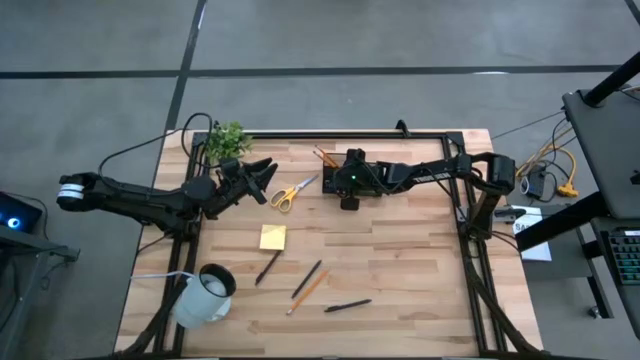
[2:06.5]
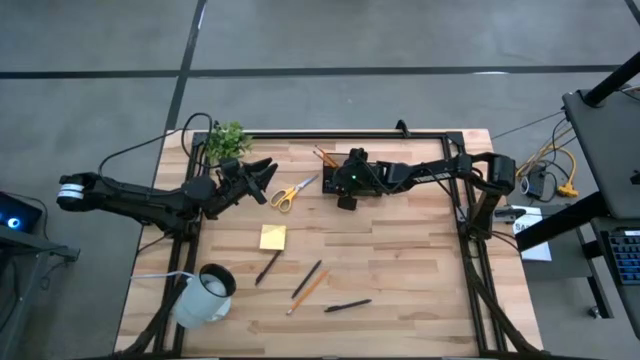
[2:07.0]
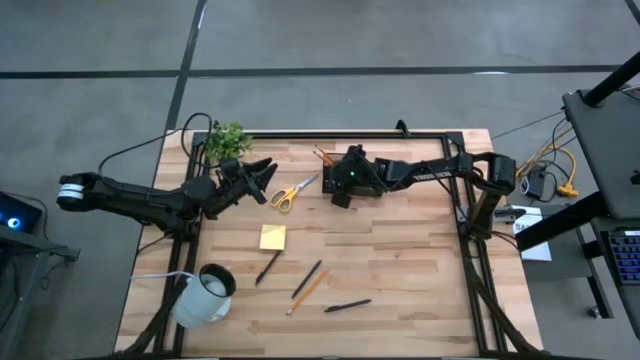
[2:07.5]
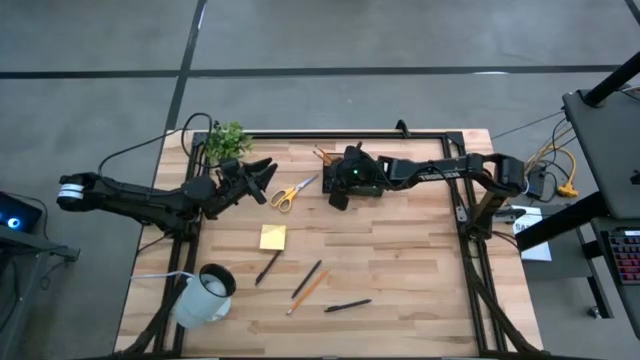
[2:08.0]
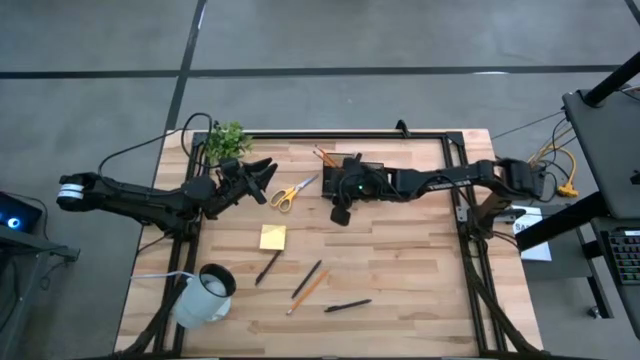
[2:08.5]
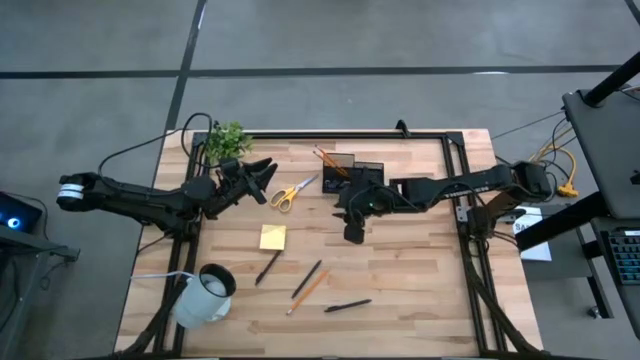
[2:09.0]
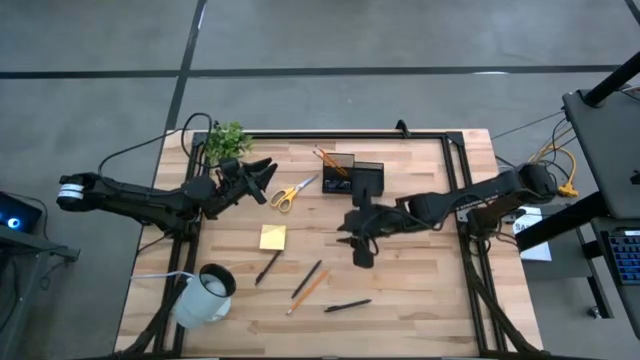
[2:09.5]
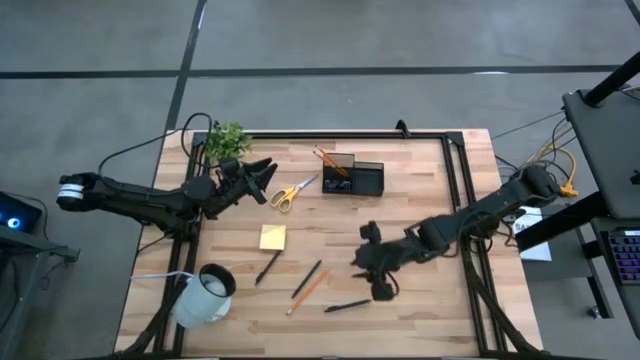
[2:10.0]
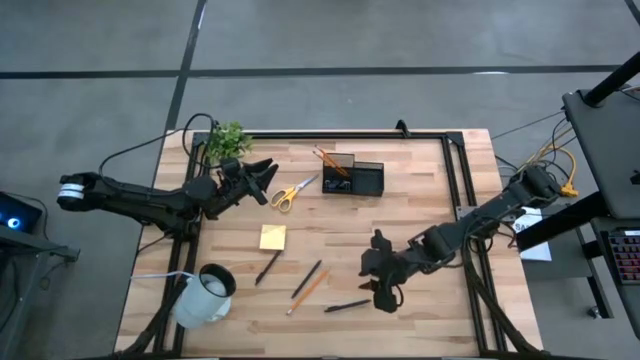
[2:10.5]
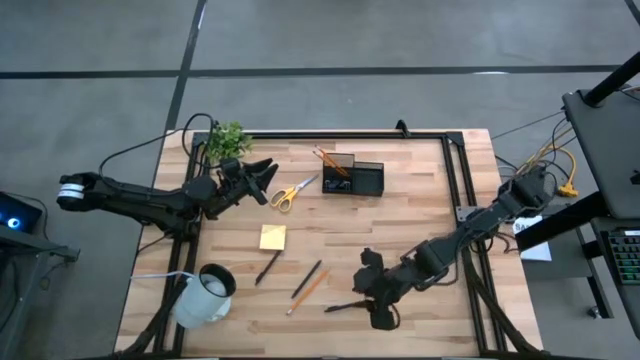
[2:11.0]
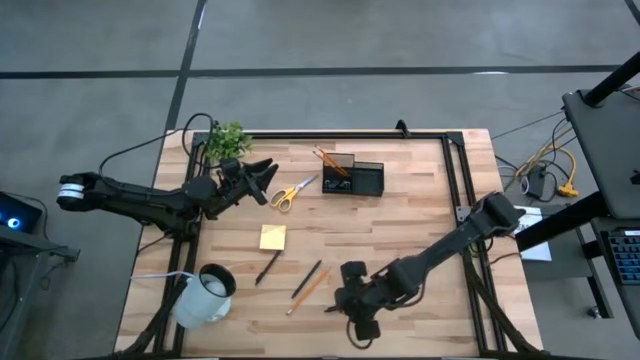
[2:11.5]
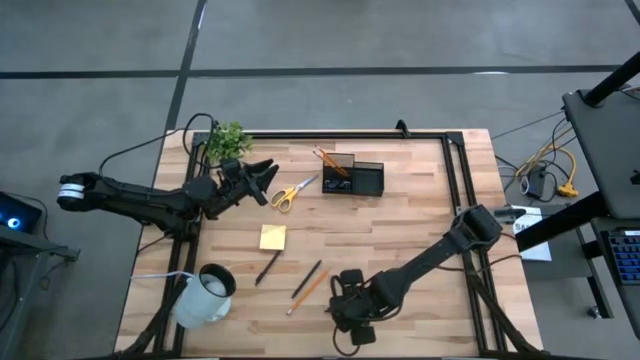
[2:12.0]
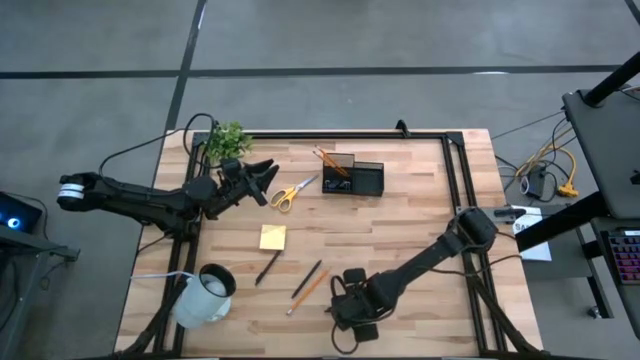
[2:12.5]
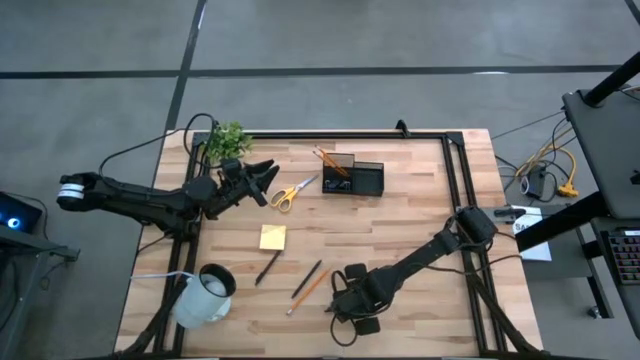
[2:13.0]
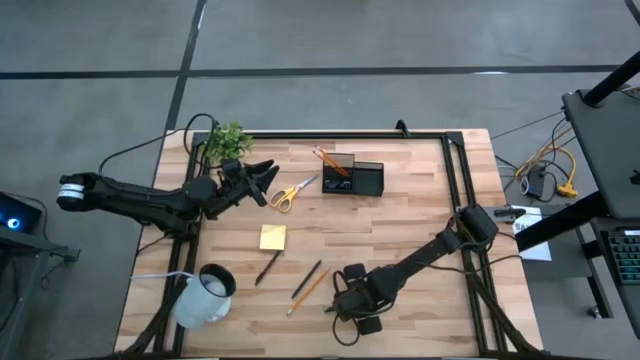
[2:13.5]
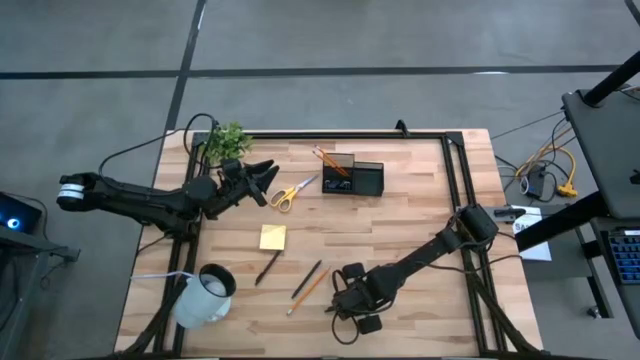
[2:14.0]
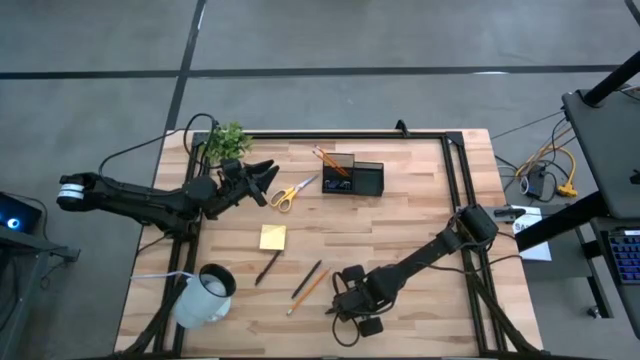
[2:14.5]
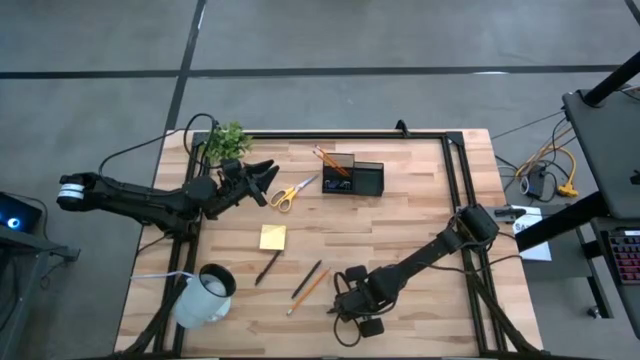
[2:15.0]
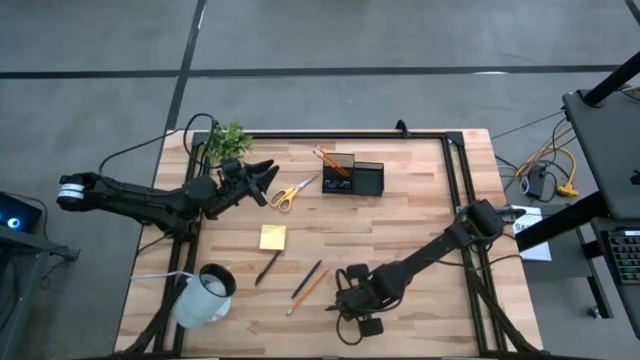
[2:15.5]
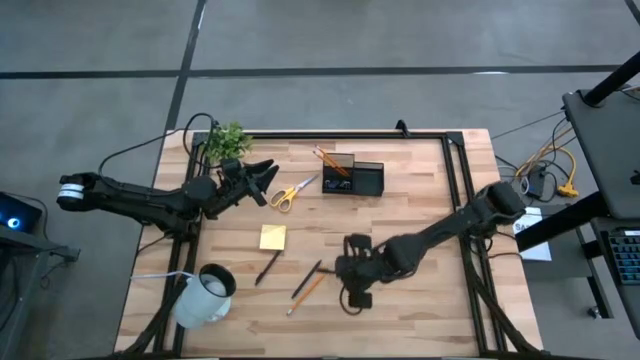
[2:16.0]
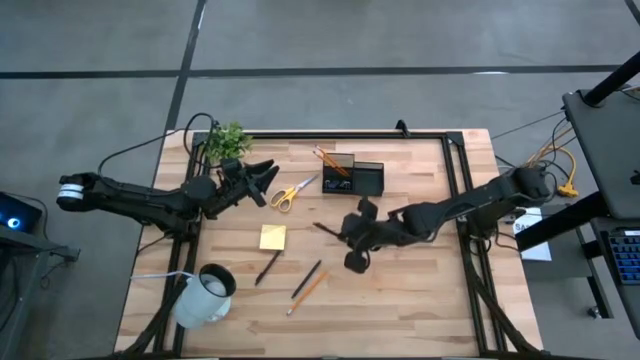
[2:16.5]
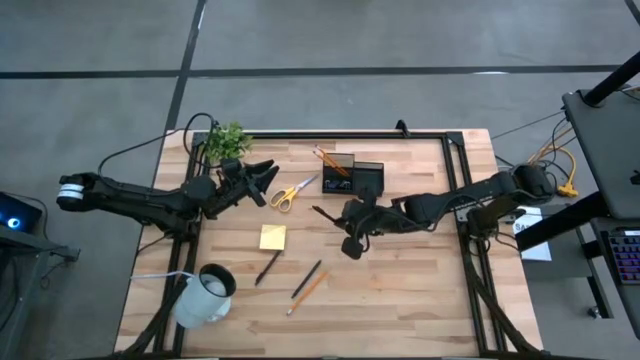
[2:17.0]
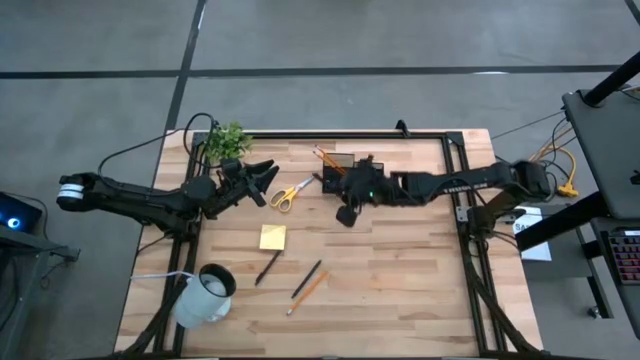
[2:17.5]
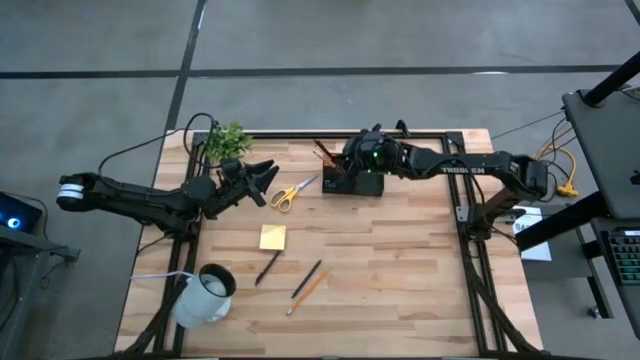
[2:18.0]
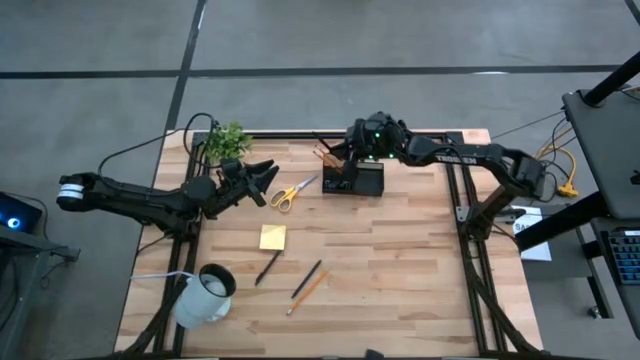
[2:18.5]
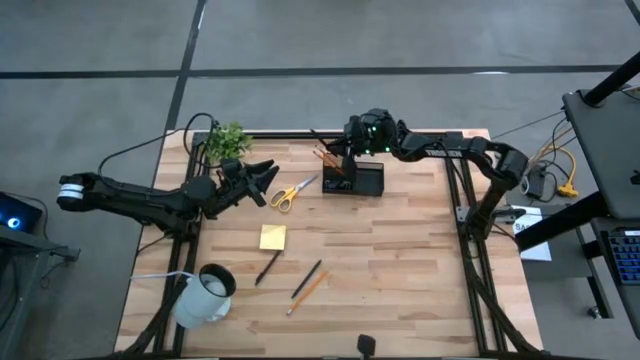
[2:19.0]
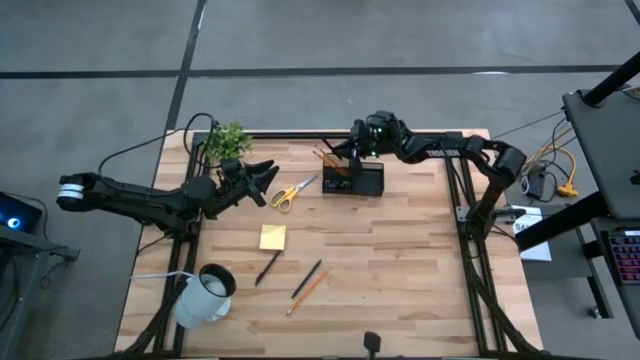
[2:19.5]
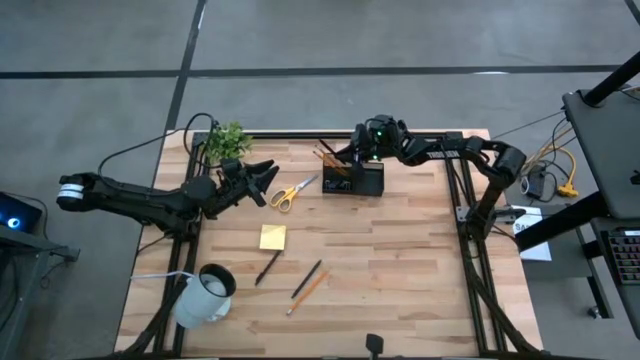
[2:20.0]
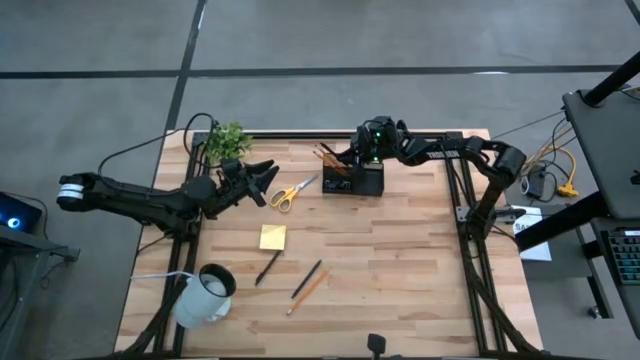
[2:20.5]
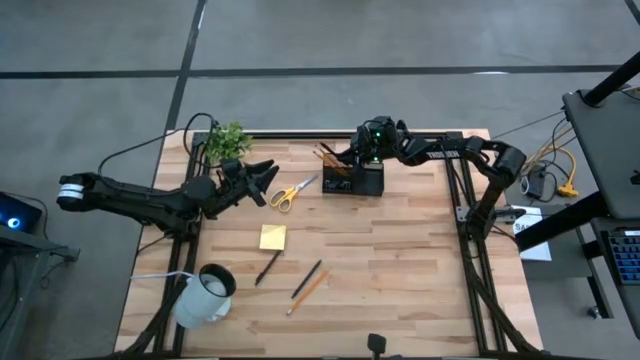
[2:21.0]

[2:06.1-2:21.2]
Task: Pick and place office supplies into organizer
Put the right pen into the desk organizer

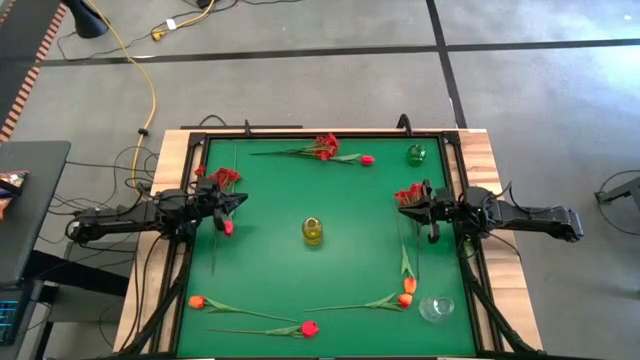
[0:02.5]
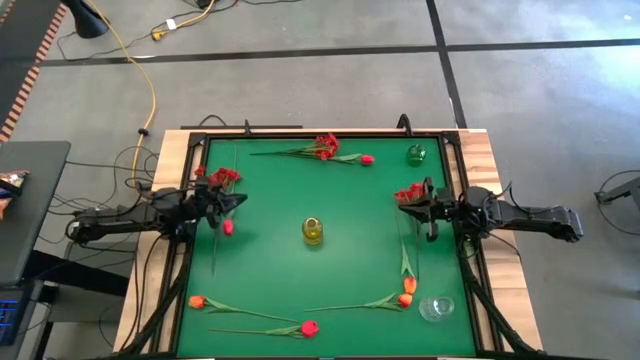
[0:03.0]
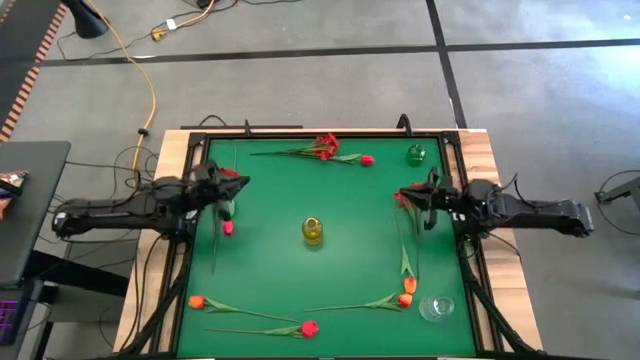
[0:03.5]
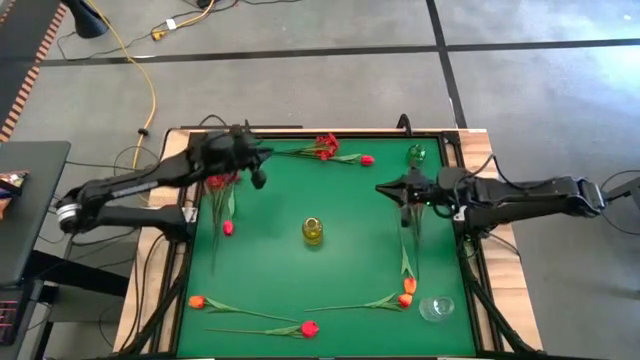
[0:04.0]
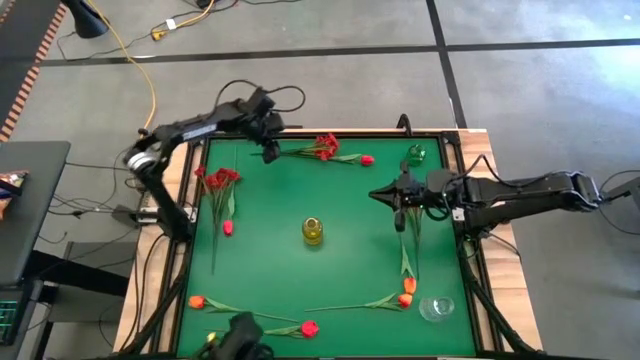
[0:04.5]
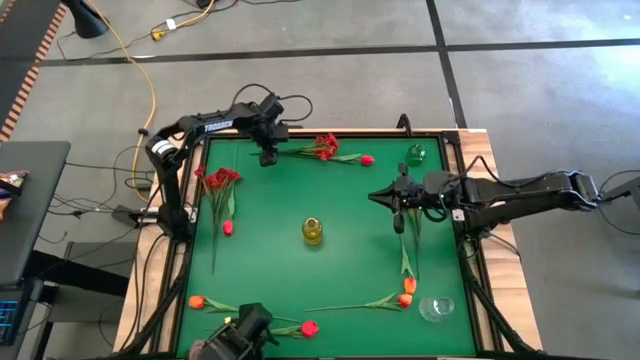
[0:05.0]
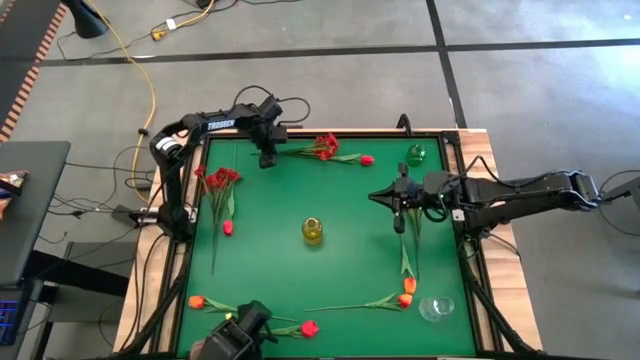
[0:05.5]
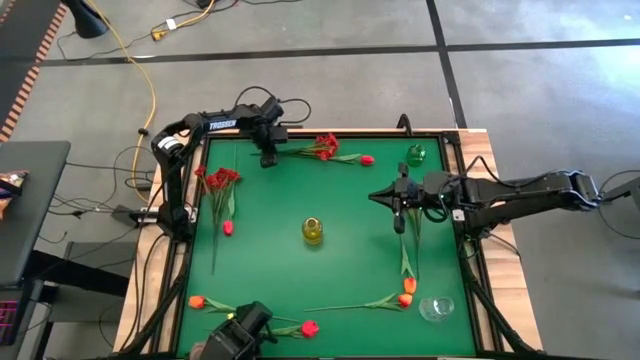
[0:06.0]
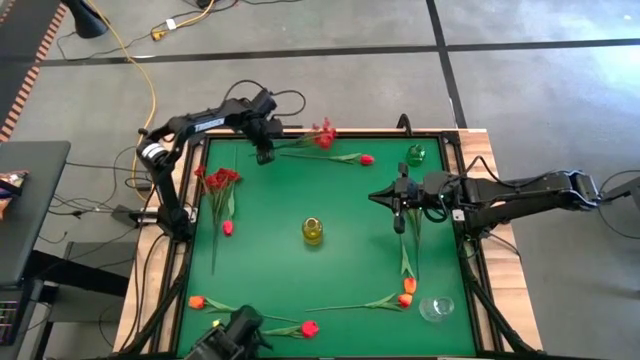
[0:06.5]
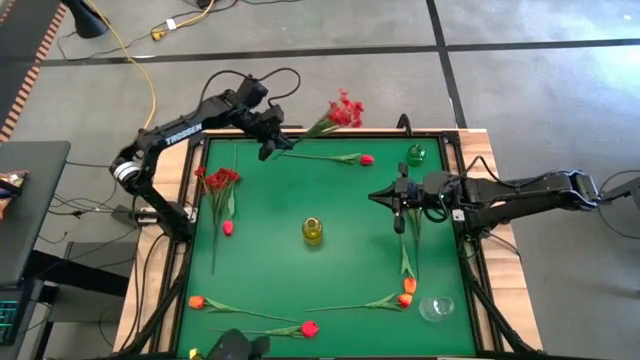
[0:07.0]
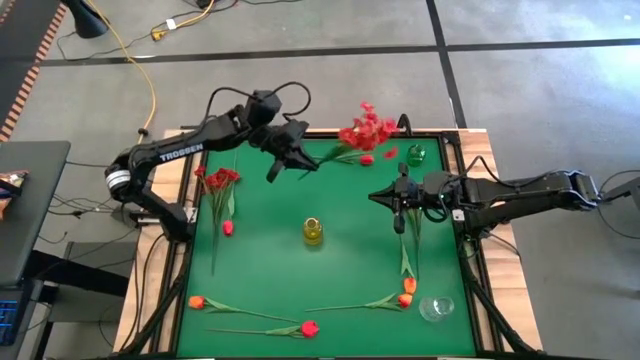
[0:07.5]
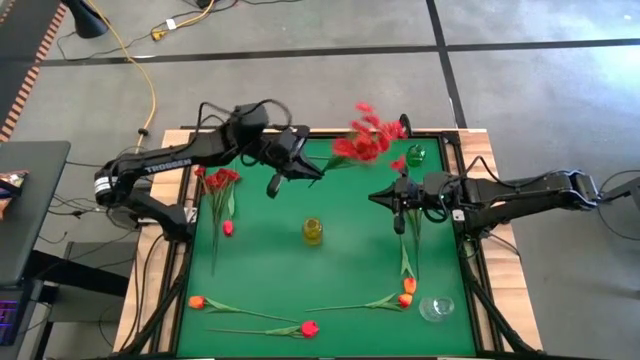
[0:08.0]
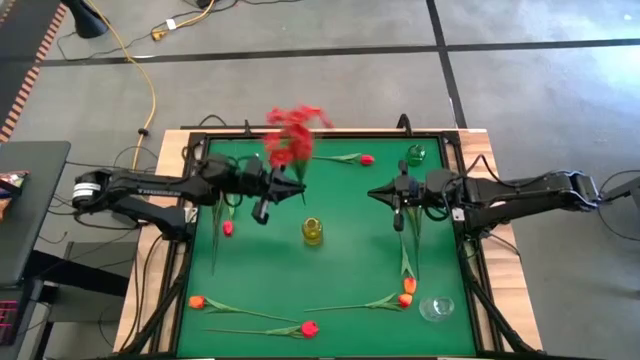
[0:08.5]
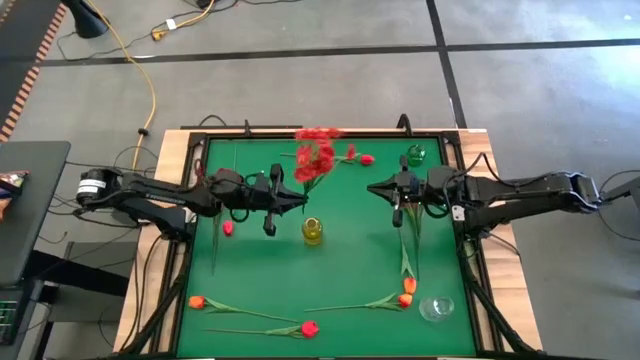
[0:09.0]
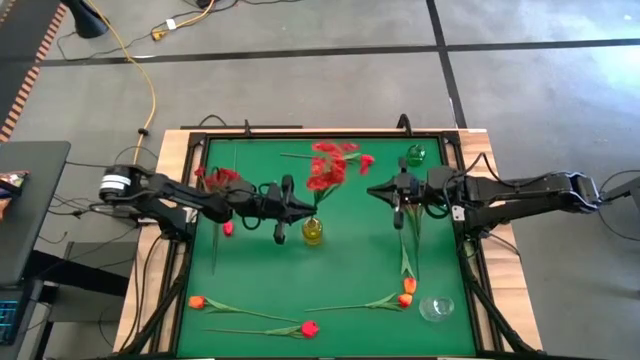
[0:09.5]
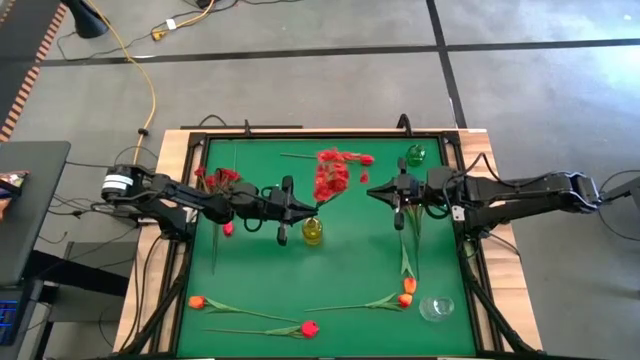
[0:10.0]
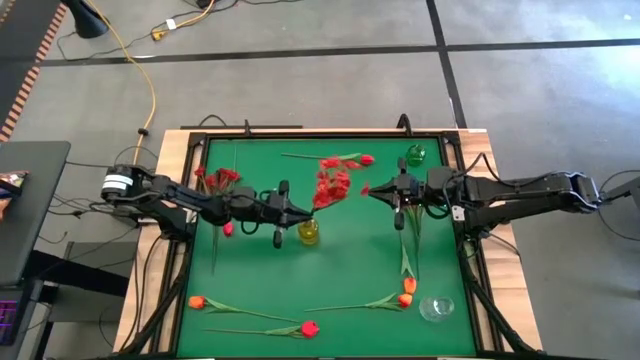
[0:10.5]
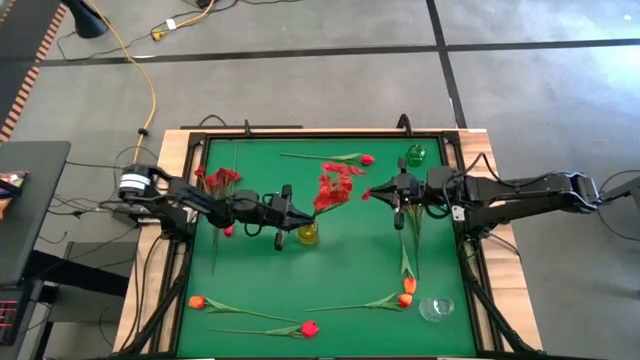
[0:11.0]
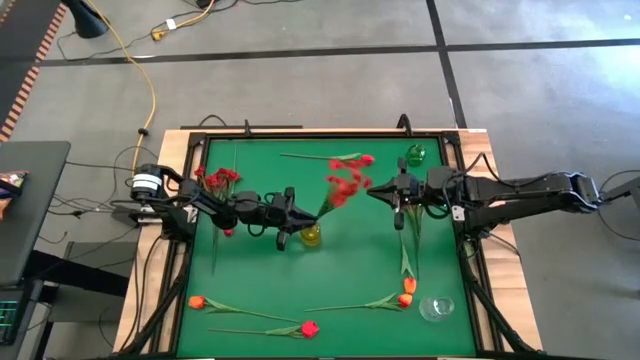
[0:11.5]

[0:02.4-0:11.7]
Task: Sort flowers into vase by color
Put the top red flowers into the yellow vase
